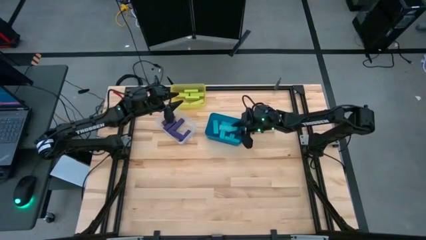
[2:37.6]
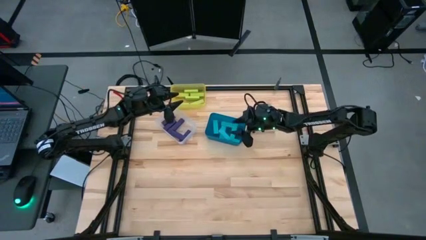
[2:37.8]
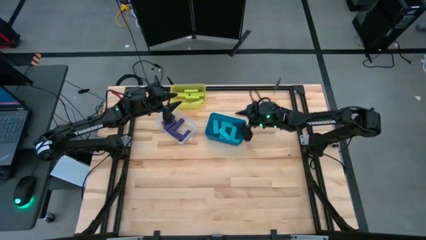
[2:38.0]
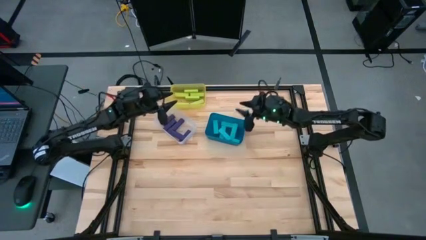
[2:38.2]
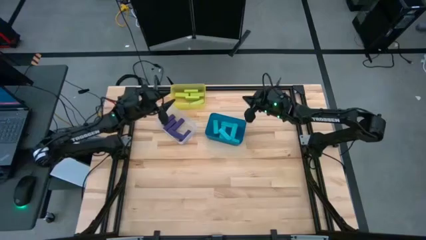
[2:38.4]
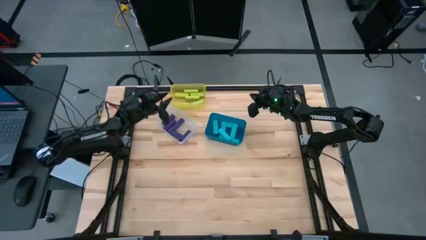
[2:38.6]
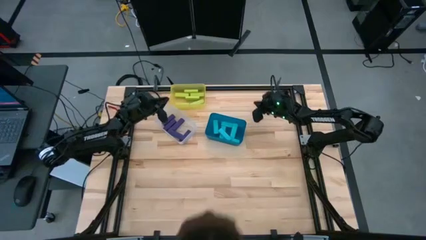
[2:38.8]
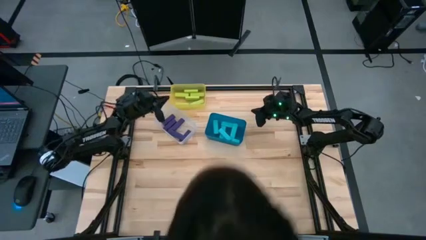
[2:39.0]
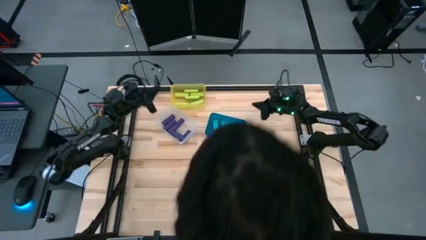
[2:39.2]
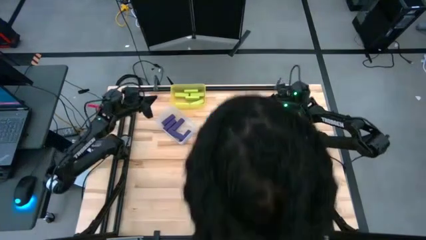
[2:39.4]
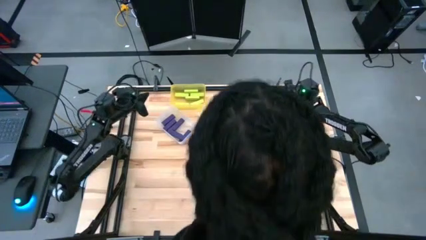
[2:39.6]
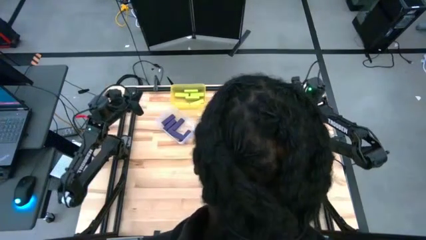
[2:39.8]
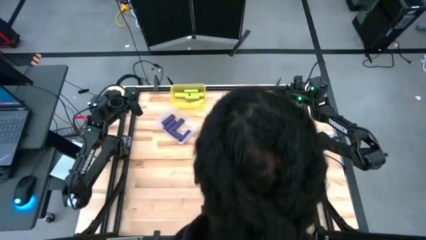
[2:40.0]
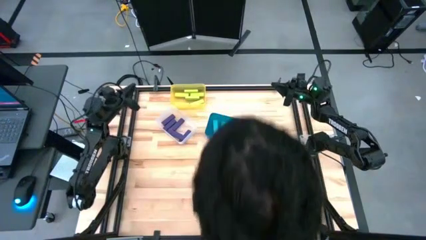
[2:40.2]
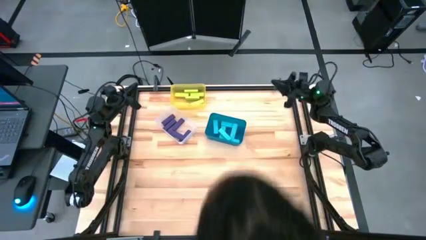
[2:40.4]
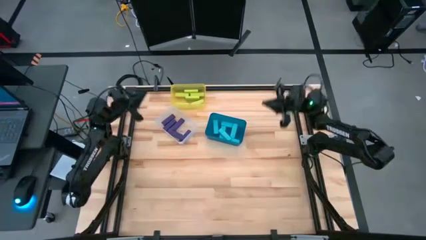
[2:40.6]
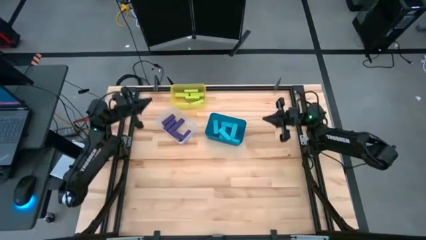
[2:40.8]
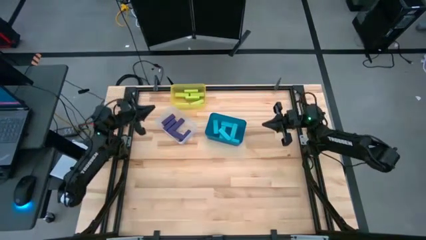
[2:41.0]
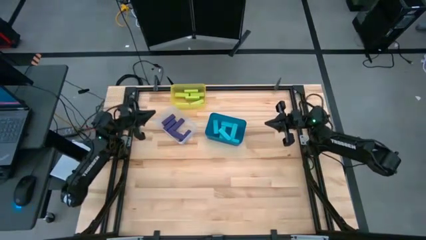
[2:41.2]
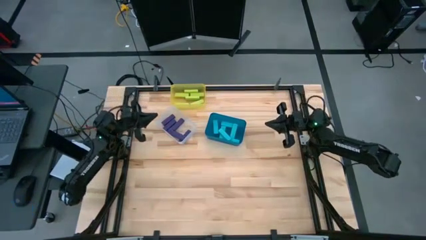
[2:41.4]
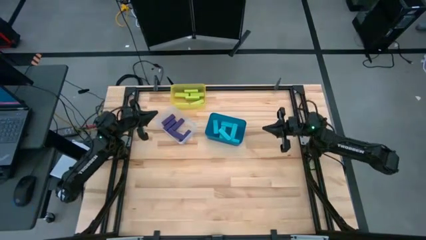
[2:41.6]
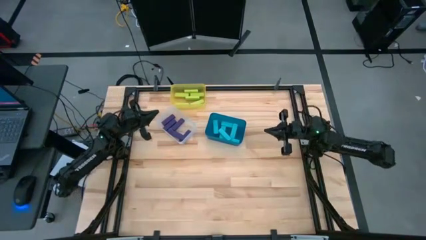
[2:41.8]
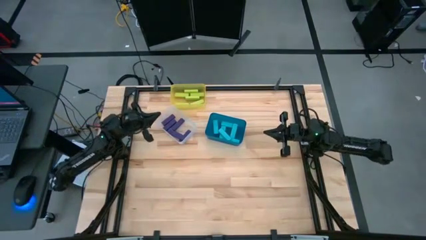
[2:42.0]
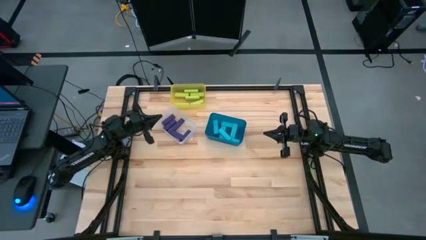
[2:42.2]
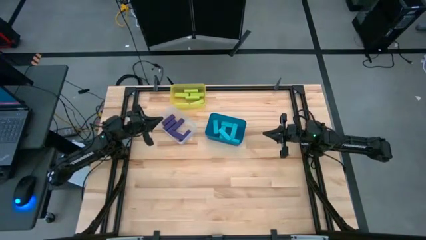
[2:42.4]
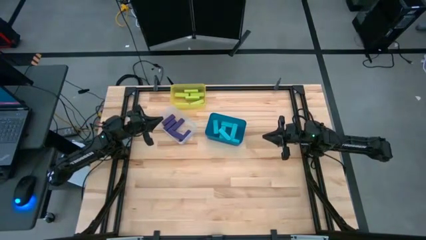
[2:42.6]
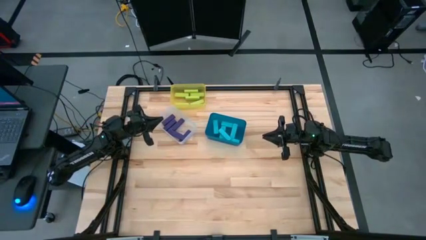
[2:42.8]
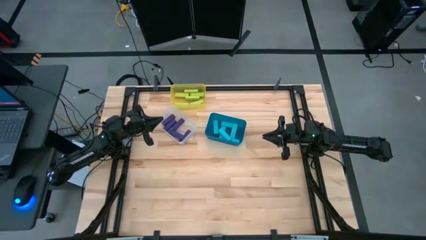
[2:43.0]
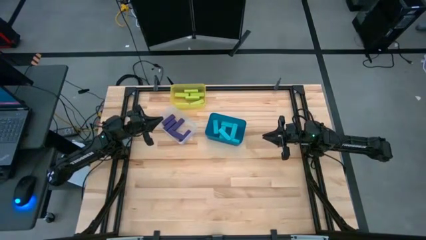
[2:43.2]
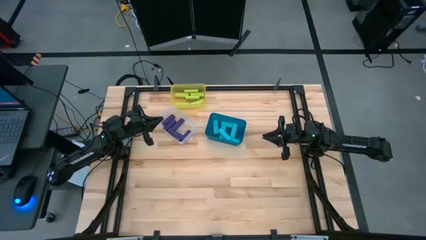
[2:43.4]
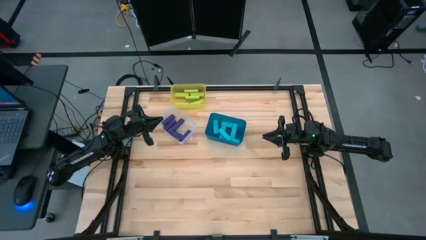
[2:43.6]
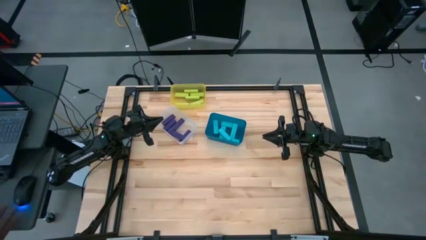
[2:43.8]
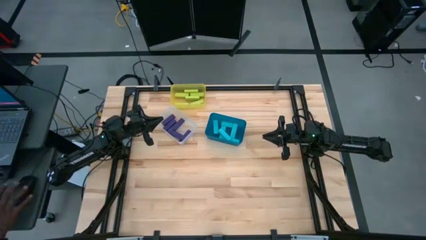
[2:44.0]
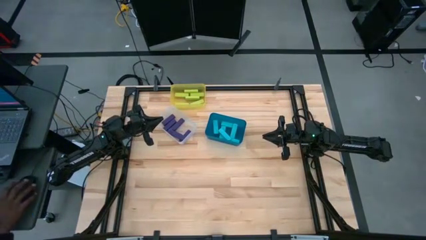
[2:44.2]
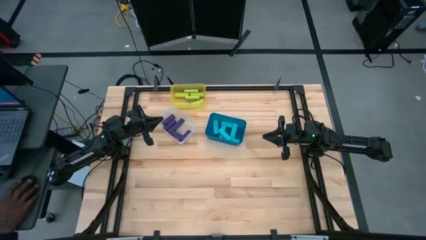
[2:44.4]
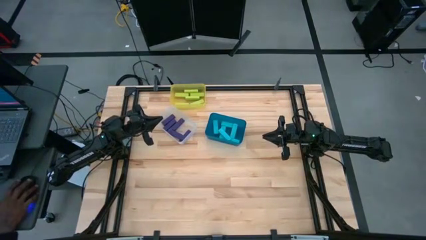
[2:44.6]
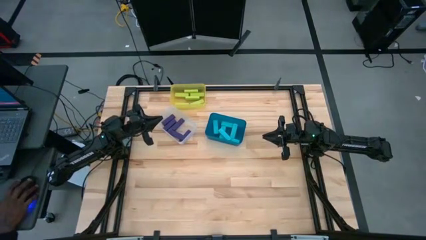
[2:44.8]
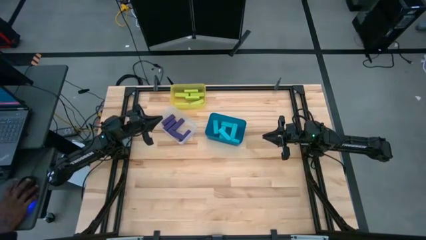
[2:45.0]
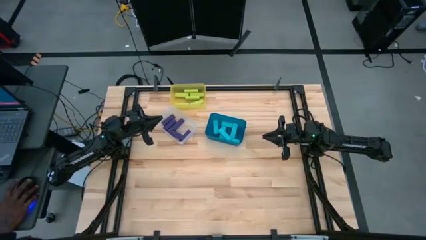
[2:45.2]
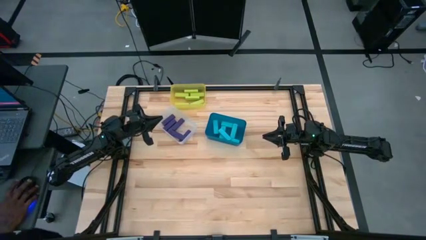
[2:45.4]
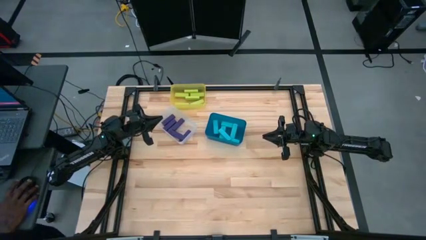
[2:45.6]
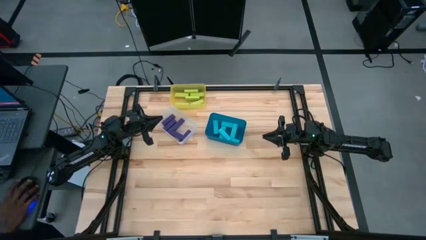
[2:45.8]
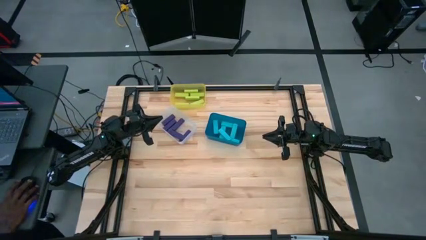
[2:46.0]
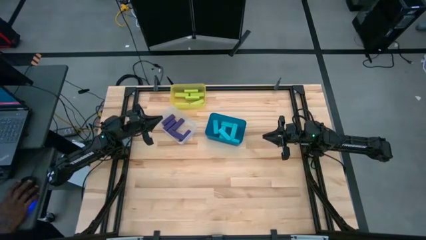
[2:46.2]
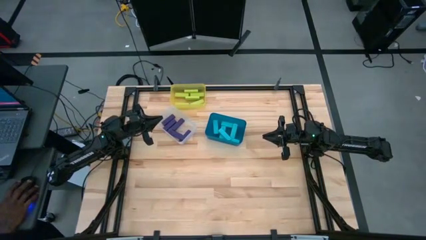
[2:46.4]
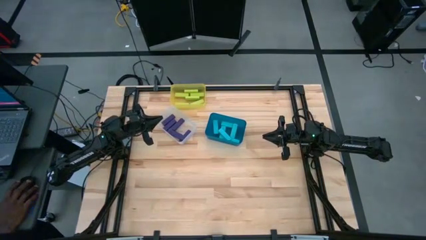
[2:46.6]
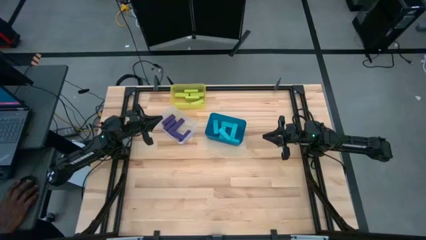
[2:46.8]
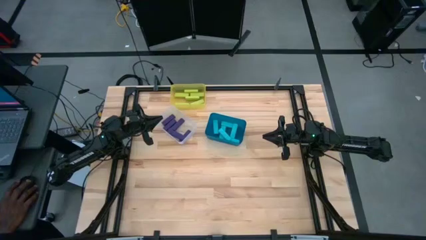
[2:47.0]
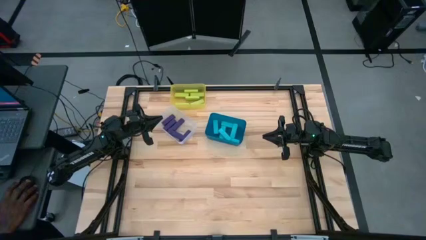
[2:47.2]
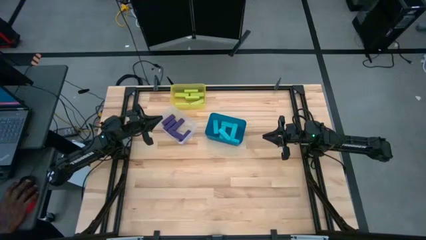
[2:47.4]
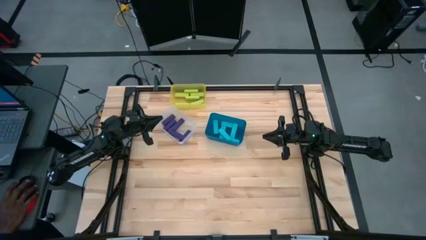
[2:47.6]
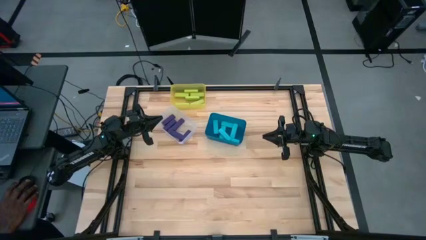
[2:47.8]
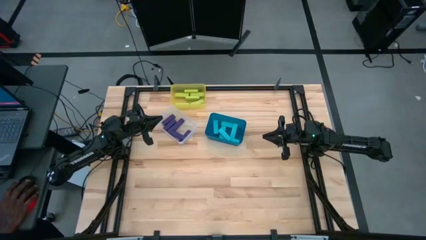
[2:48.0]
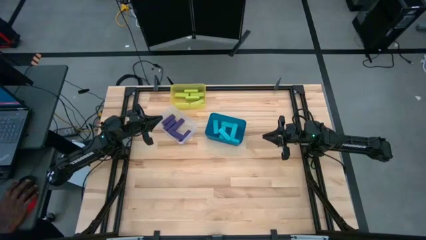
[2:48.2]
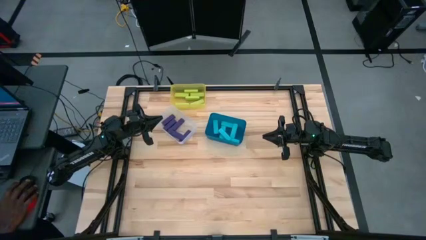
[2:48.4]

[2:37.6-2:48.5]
Task: Sort blocks
Return to Home Position

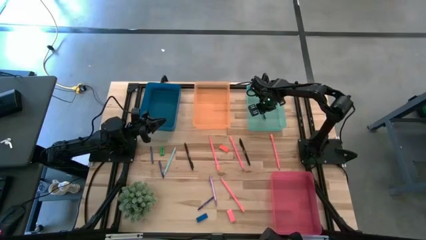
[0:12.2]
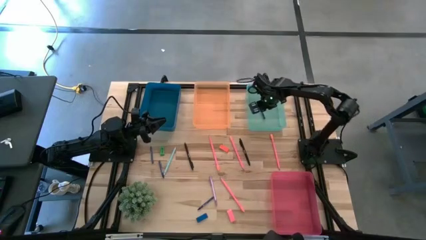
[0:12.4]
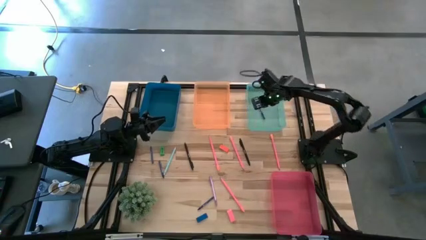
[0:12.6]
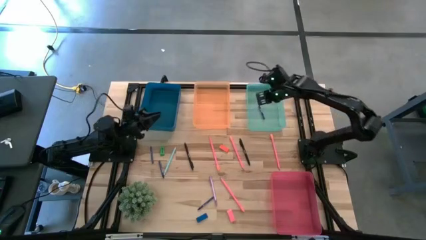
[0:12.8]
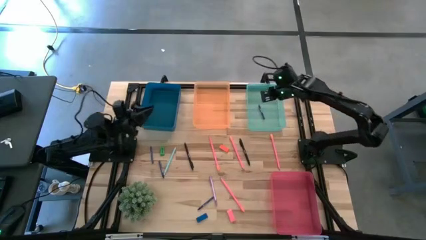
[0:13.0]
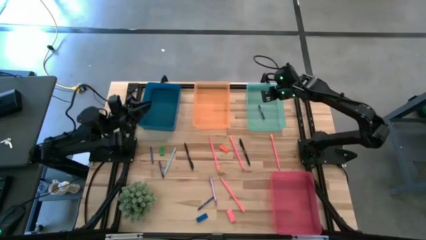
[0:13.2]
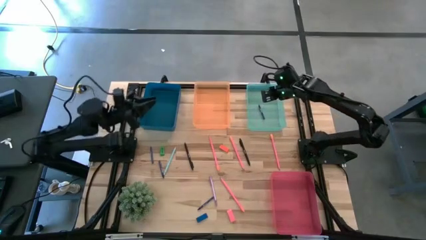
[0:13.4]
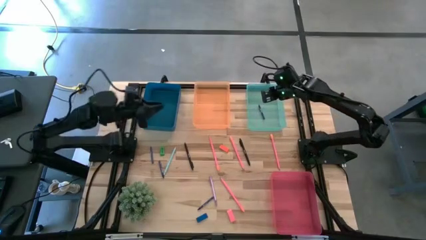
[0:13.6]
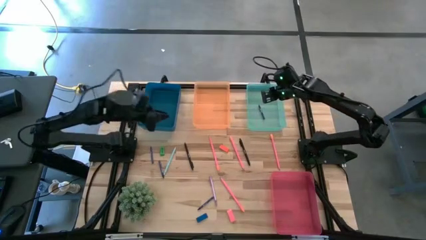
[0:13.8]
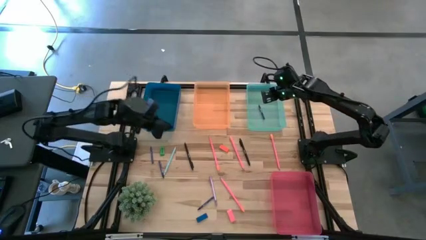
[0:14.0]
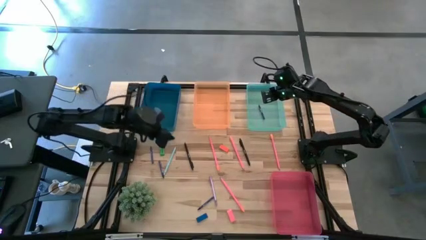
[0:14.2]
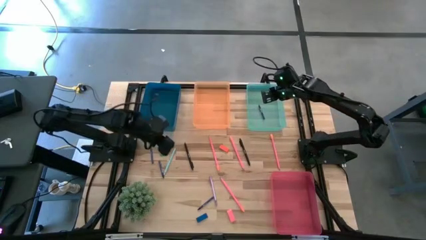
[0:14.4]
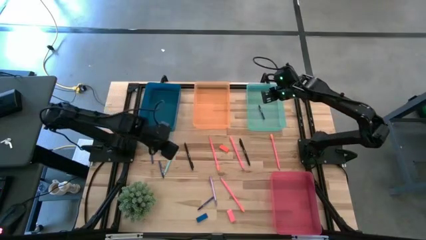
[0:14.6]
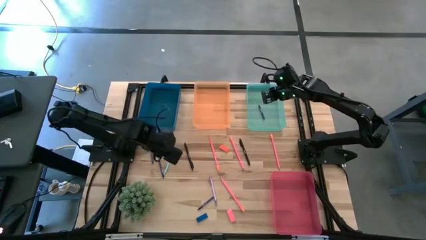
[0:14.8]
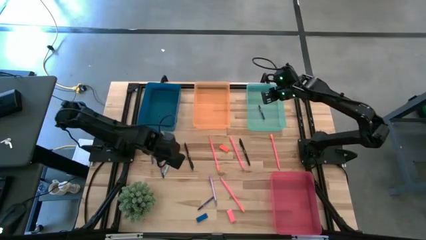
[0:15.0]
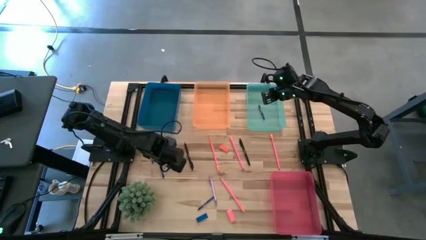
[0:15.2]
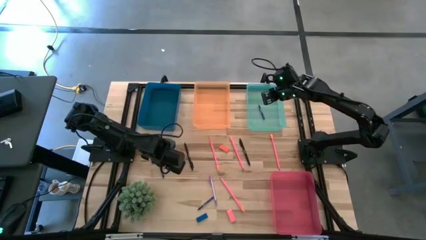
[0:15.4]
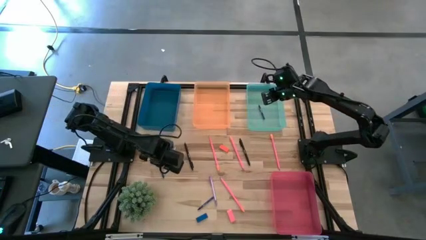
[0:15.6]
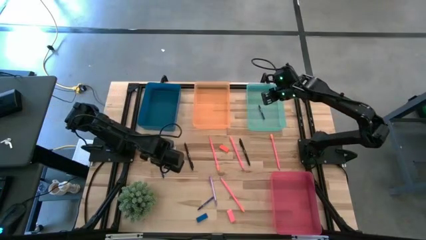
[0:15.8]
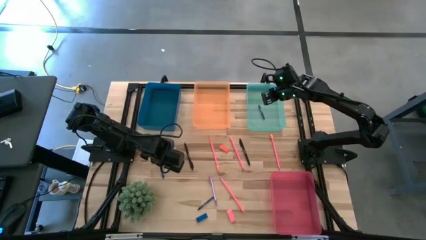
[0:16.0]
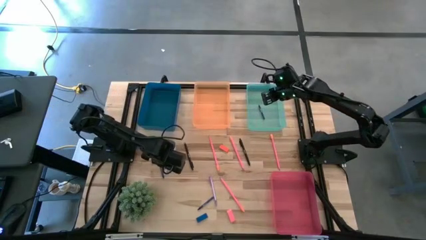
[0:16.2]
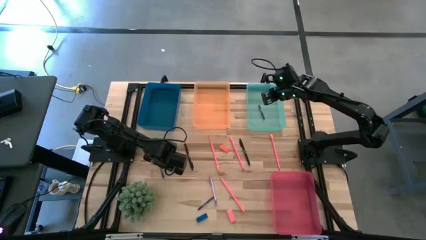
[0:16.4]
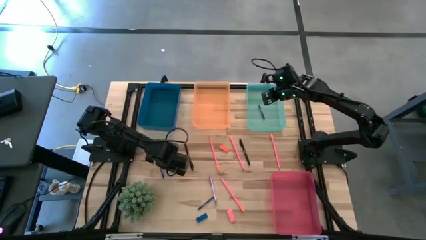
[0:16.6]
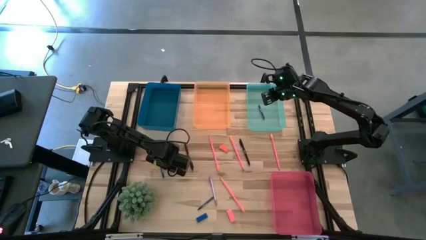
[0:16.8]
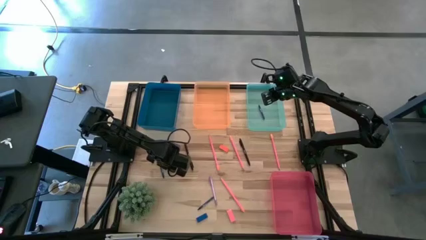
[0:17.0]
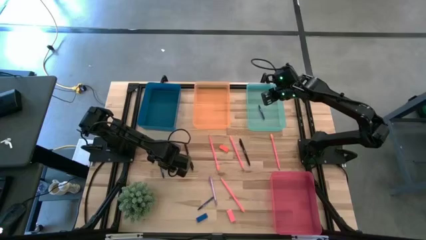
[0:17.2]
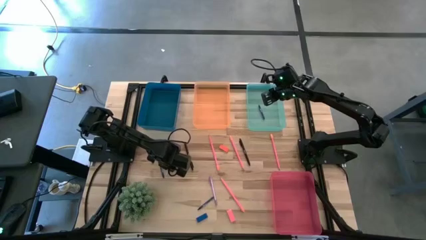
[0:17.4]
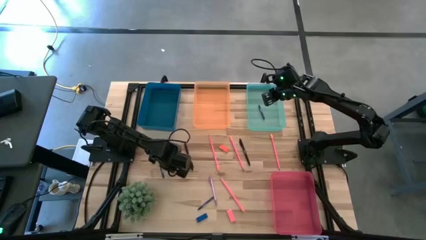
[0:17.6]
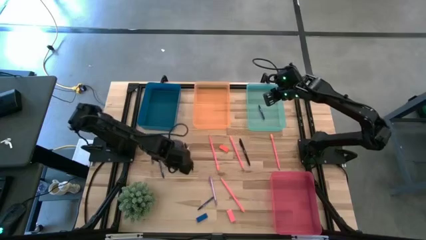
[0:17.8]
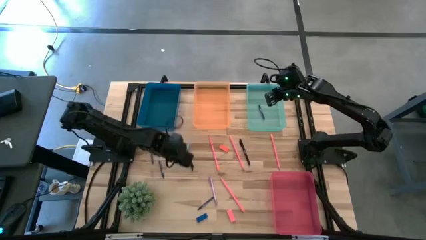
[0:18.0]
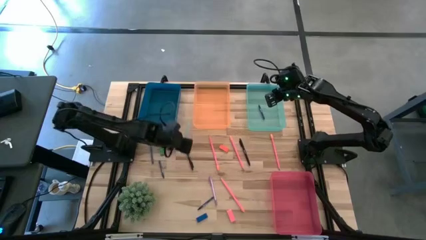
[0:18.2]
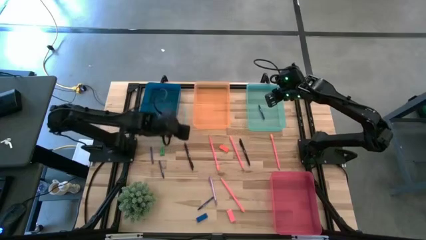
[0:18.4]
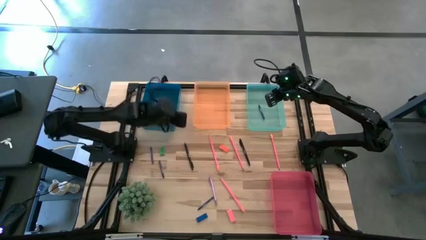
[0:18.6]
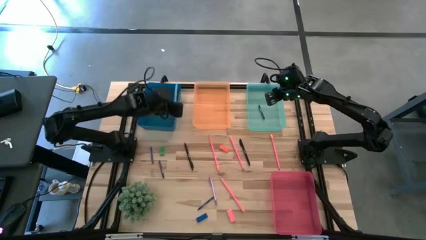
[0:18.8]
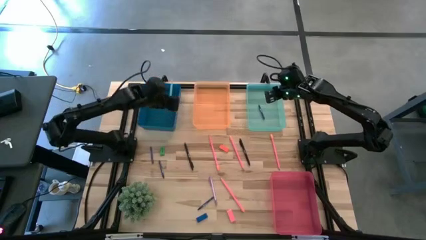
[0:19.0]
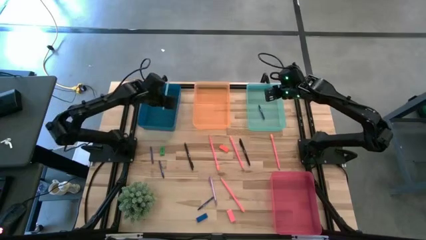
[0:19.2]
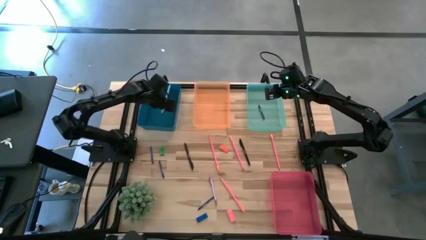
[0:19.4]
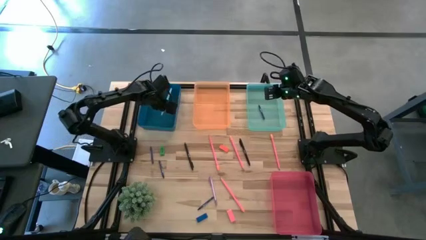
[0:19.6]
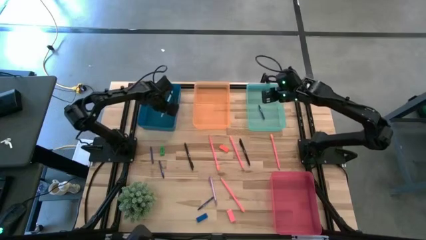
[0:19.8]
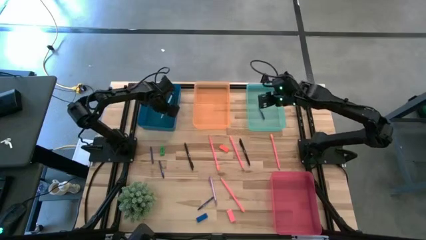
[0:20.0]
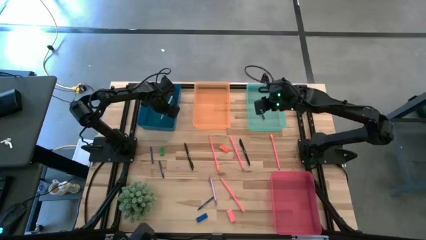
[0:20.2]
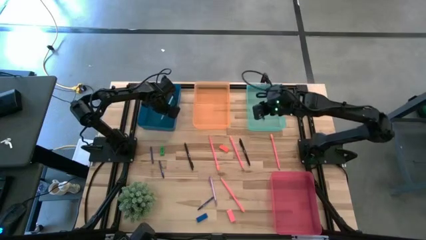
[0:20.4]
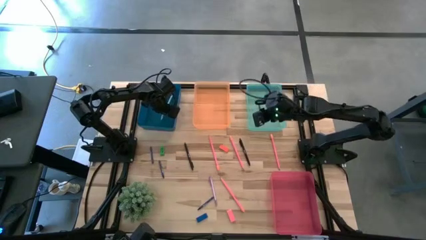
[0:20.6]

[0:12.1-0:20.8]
Task: Sort crayons/erasers/pens/pencils in bins
Put the green pen into the blue bin
